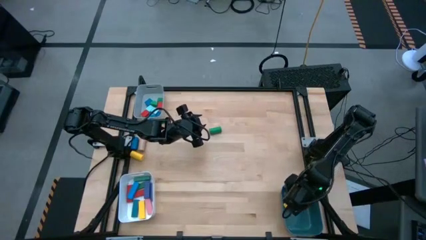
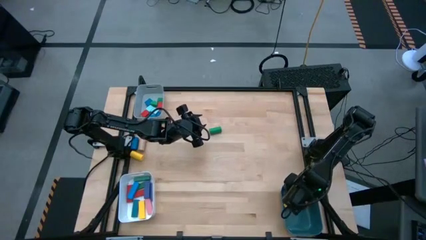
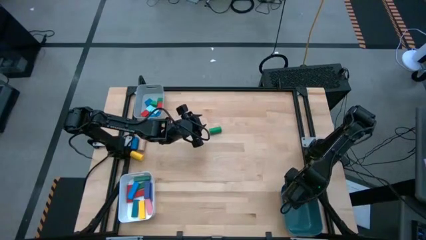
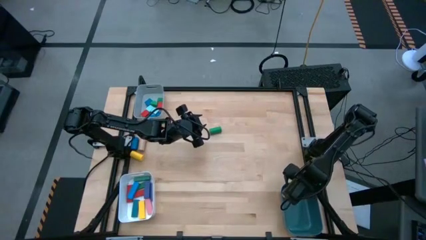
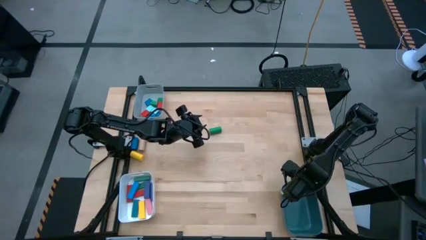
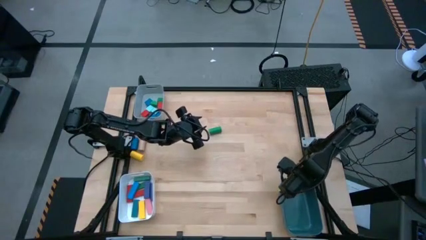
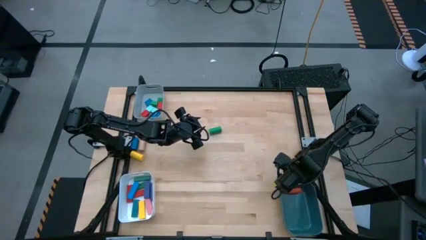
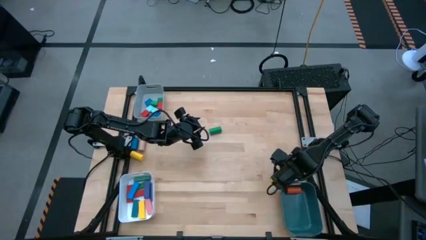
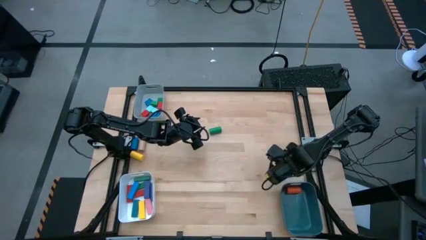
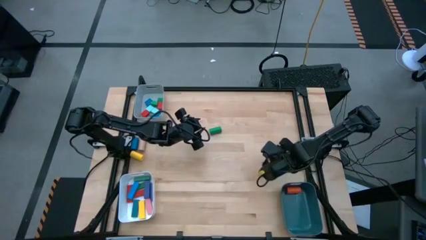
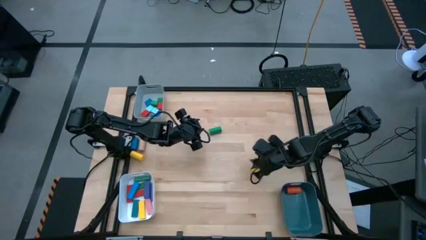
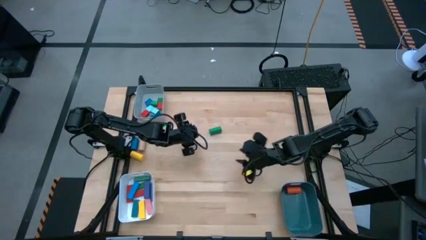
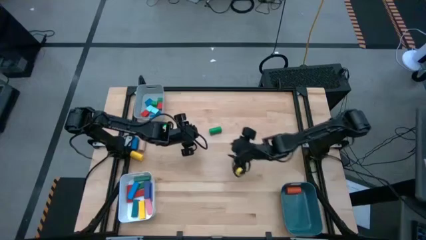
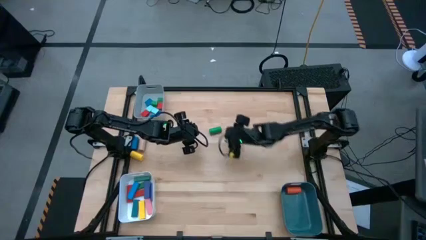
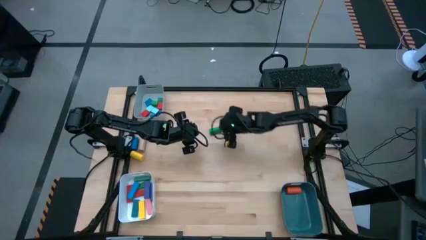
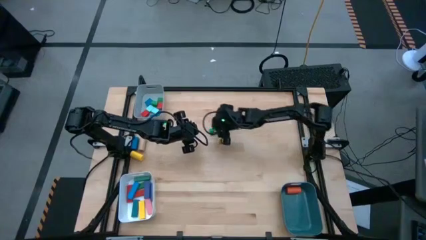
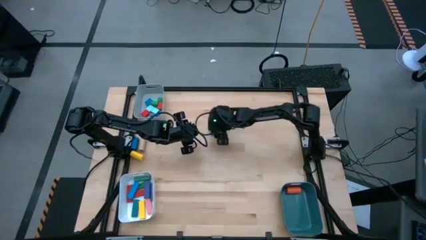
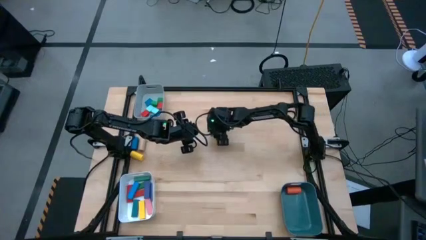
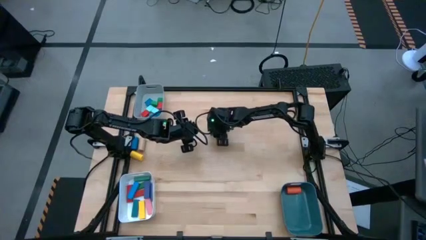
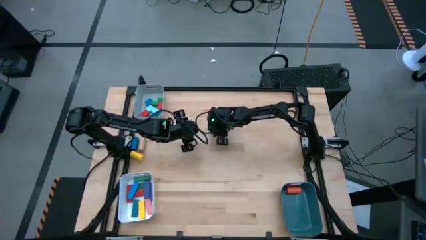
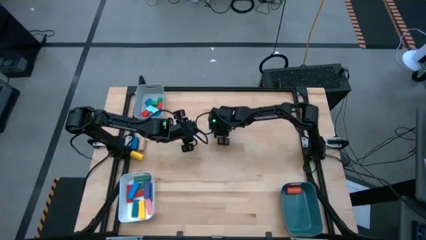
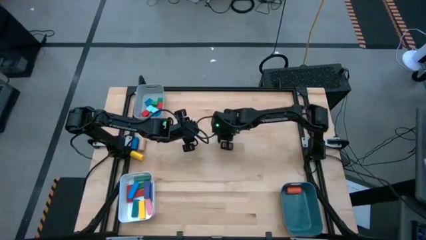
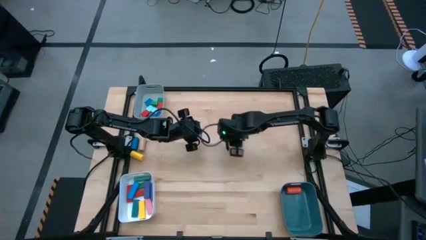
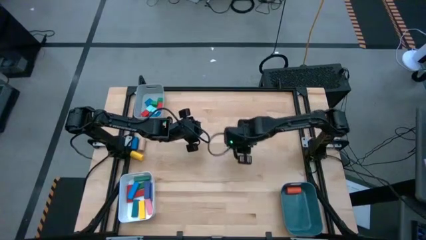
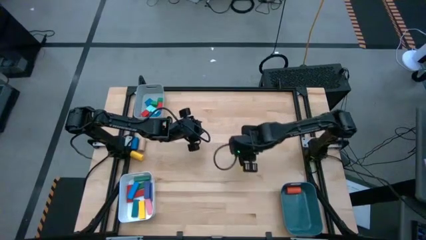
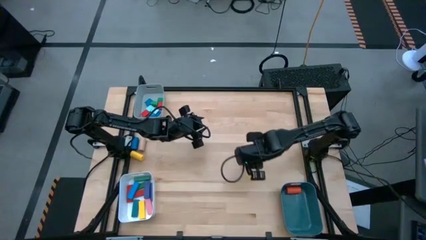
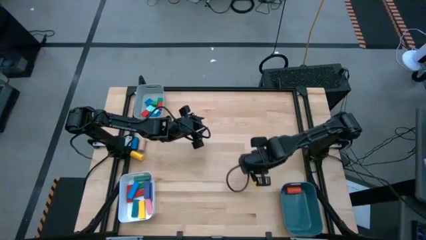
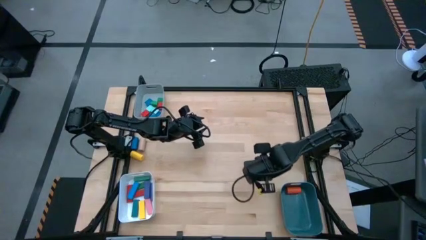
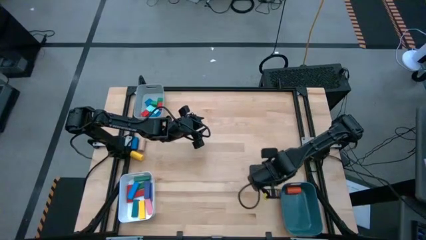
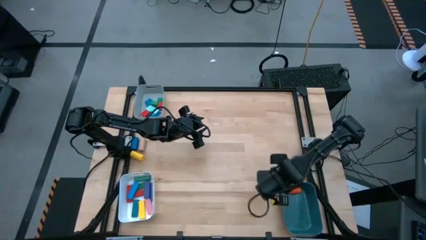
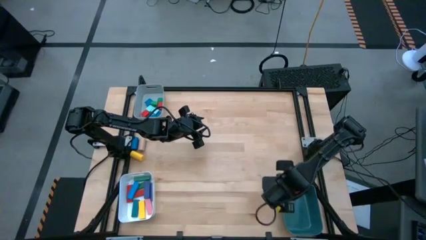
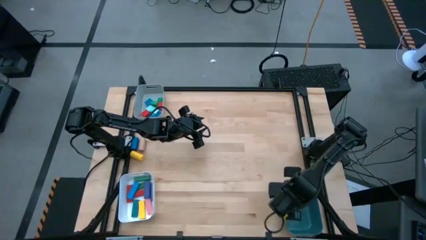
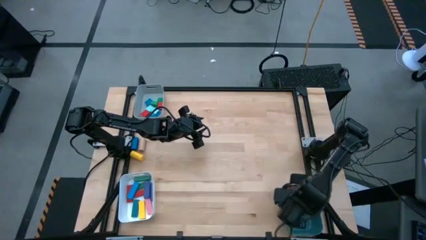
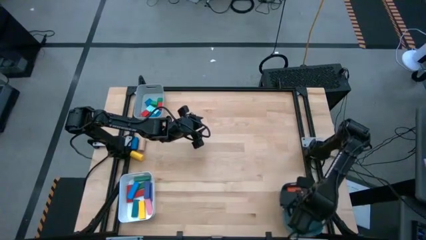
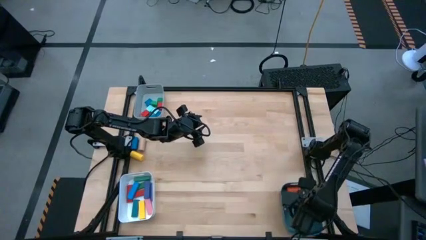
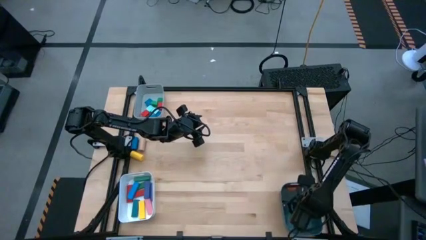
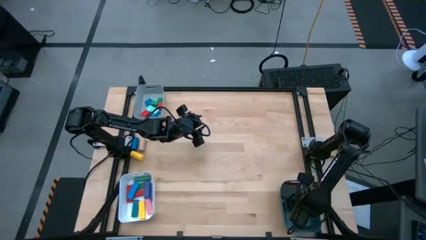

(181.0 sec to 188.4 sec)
Task: Sort blocks by size
Put the green cylindrical block into the blue bin

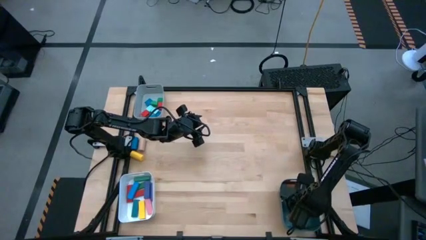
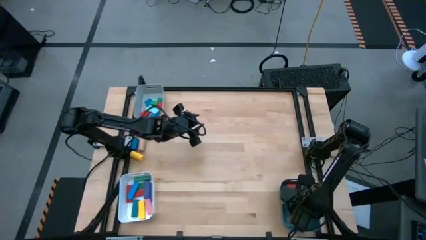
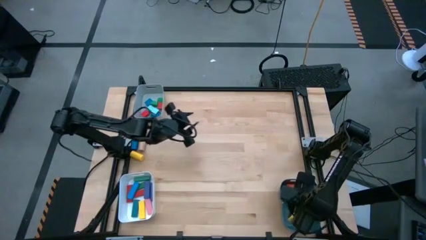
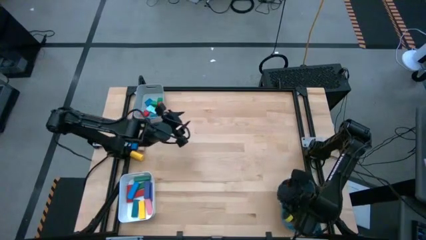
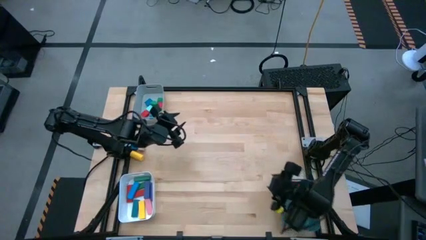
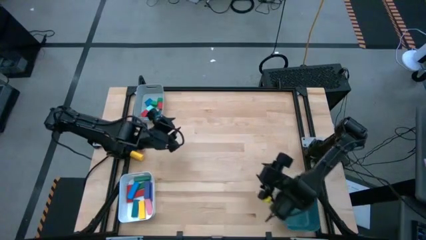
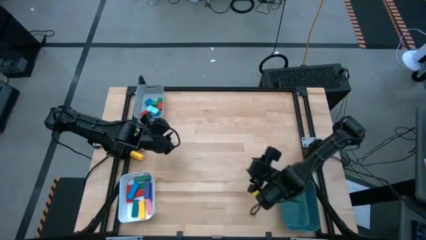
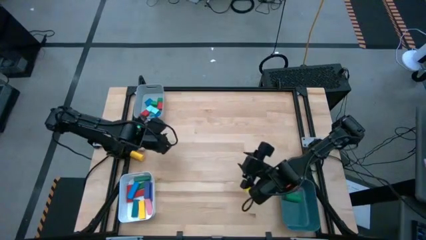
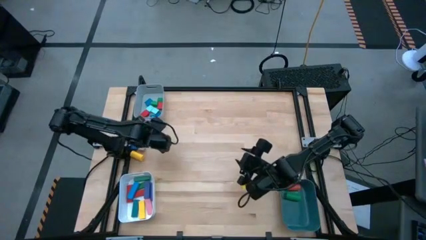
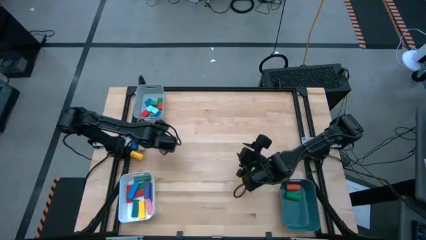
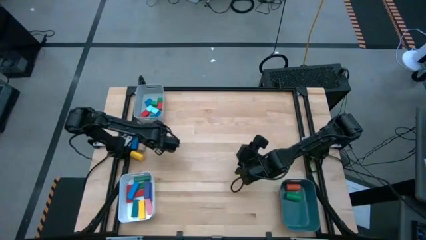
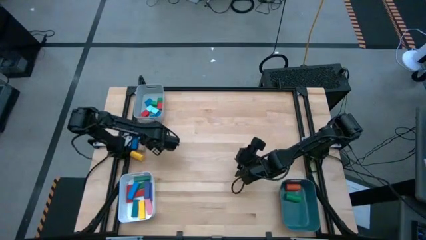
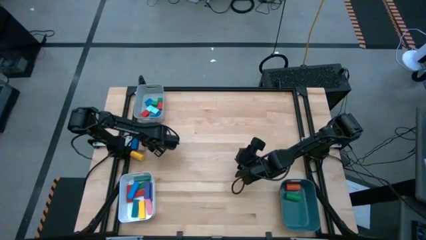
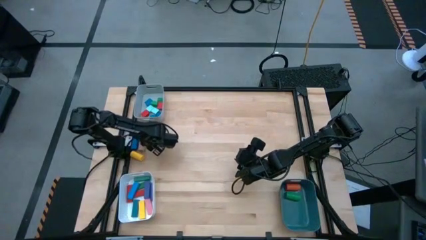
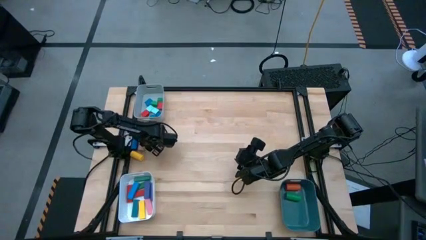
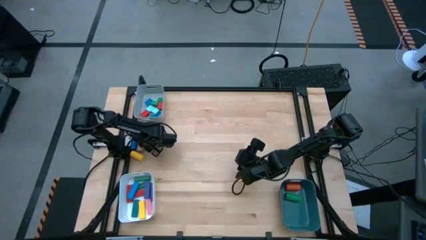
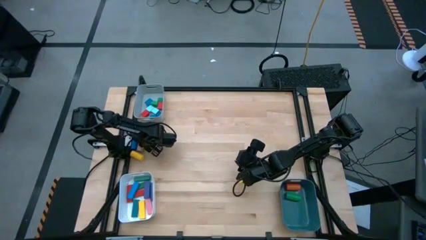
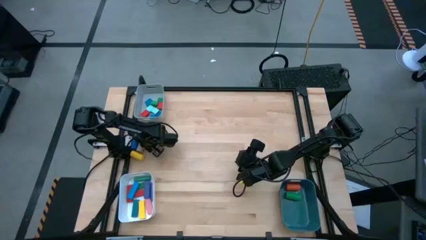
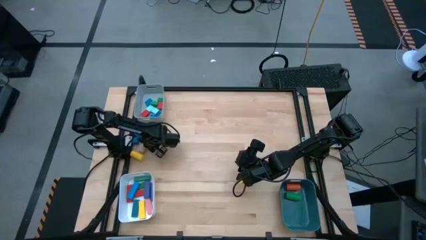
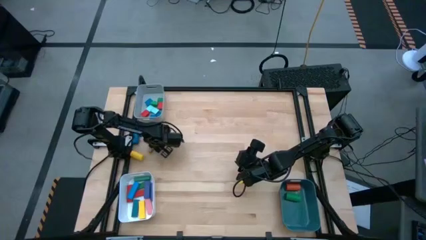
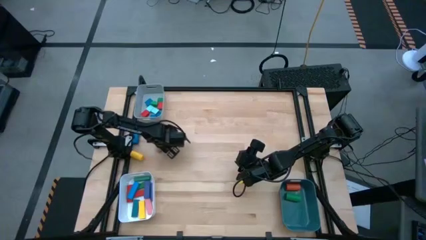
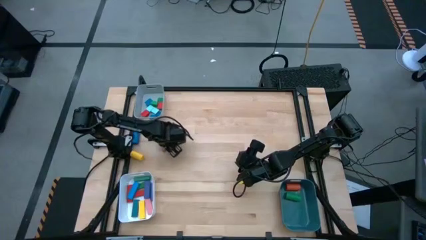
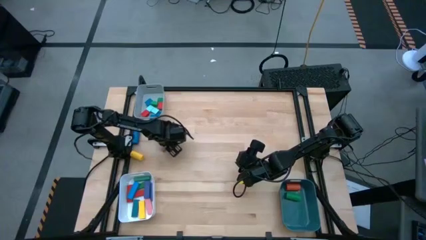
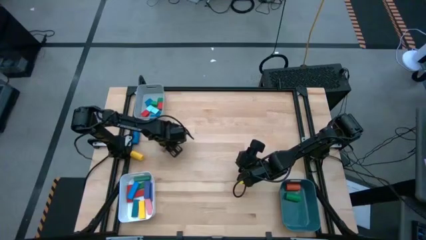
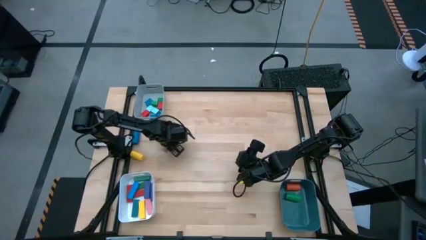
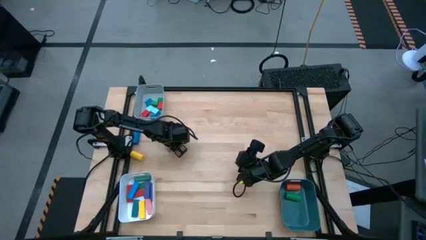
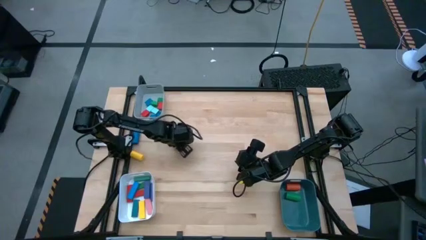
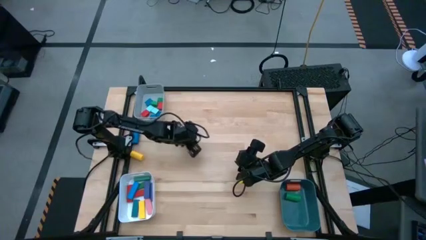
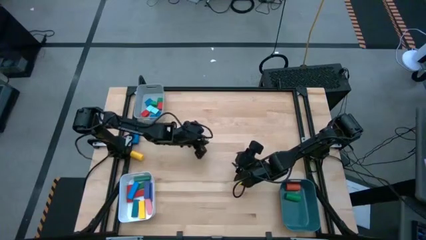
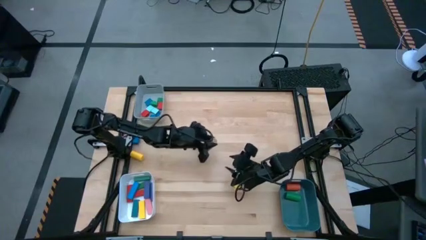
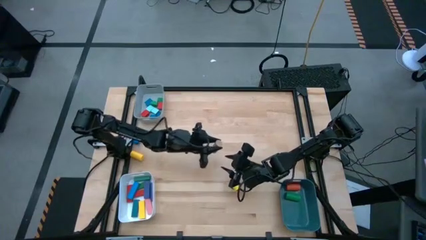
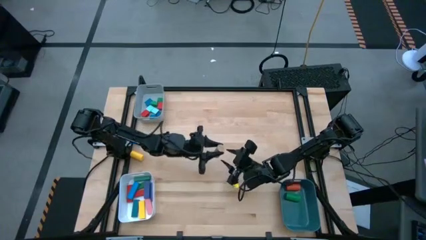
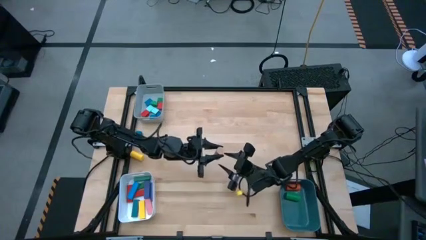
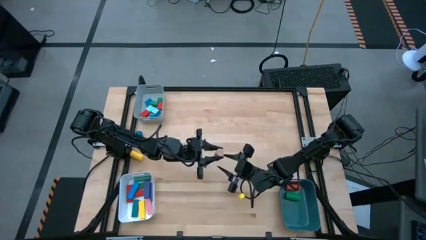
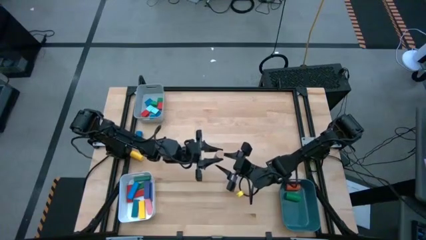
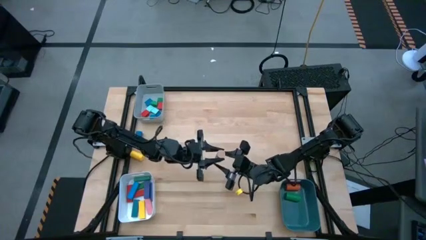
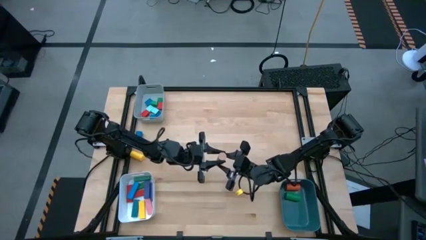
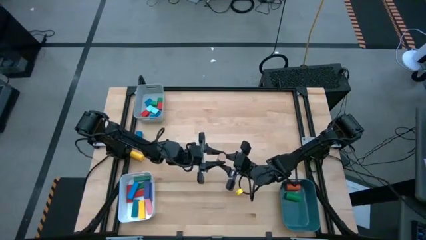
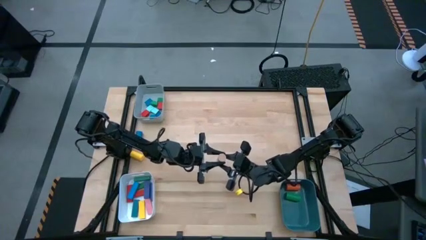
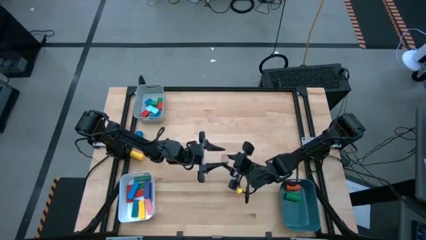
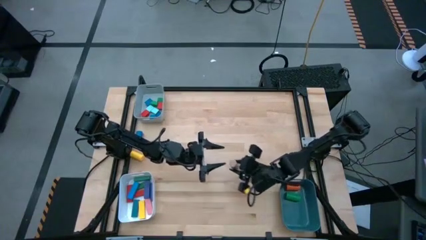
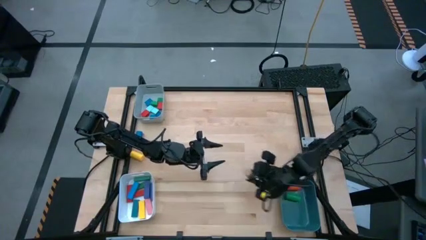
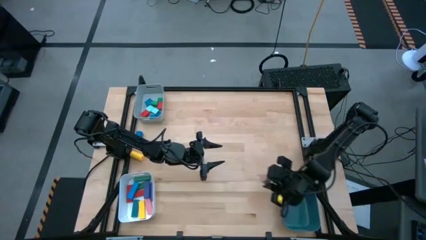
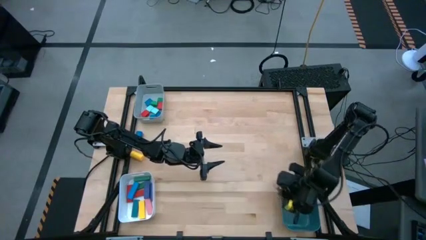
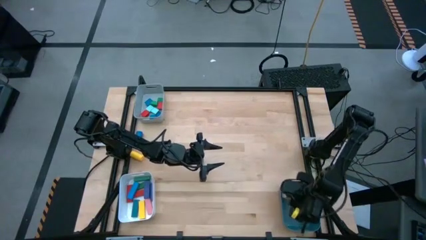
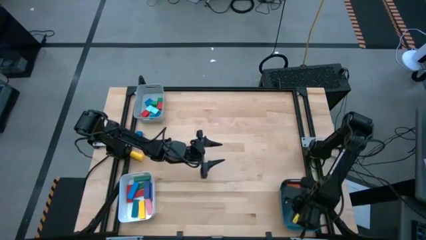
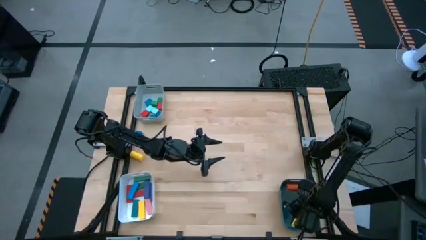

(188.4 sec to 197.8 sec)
Put the brown cylindrical block into the blue bin
